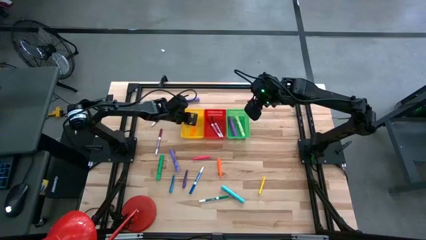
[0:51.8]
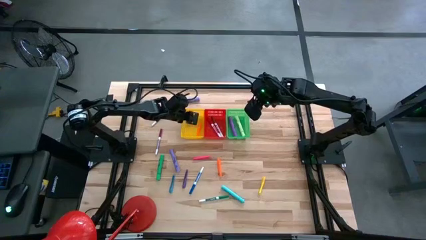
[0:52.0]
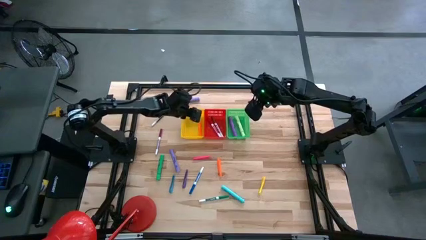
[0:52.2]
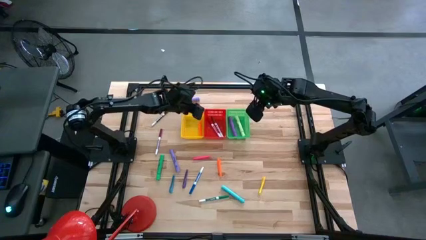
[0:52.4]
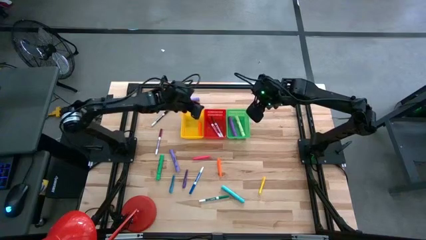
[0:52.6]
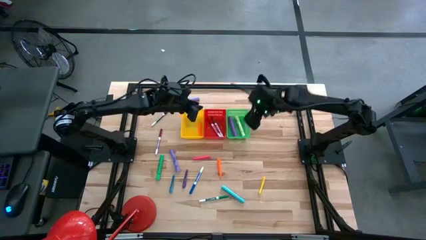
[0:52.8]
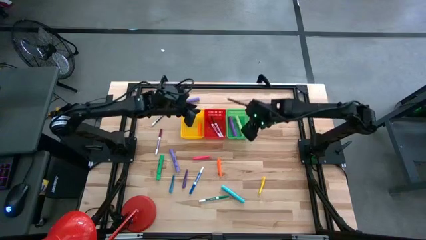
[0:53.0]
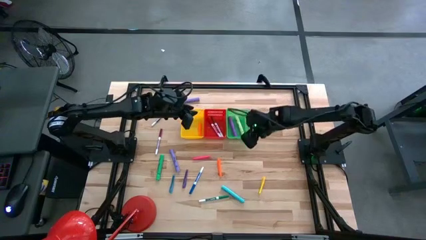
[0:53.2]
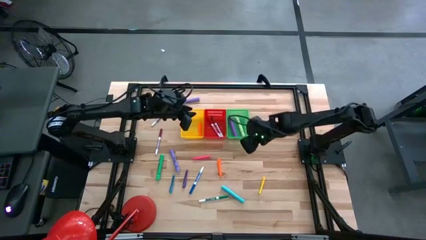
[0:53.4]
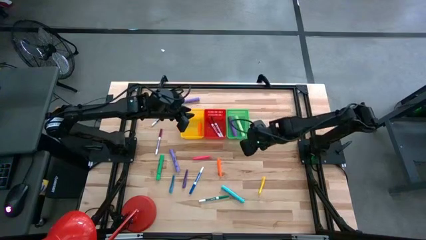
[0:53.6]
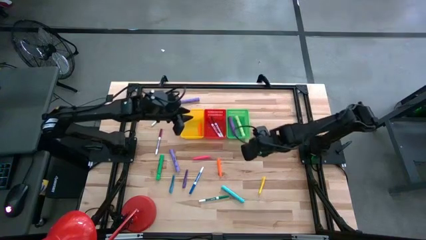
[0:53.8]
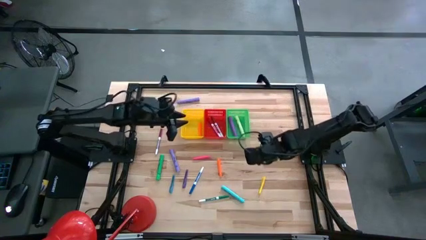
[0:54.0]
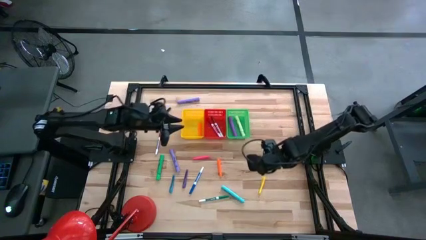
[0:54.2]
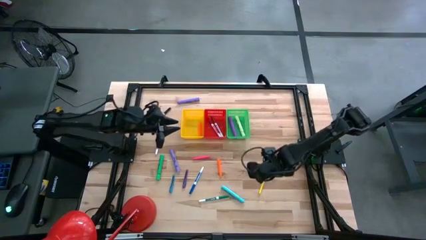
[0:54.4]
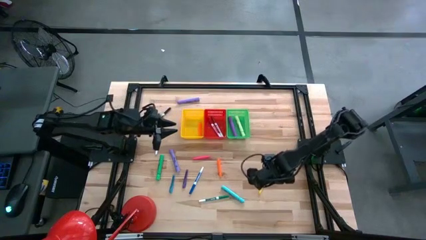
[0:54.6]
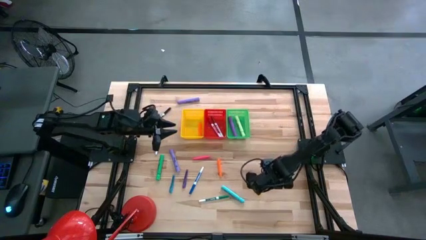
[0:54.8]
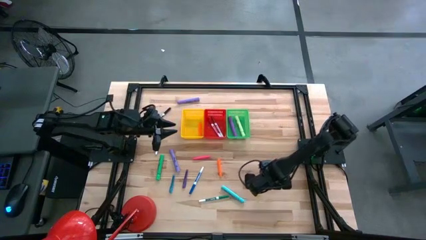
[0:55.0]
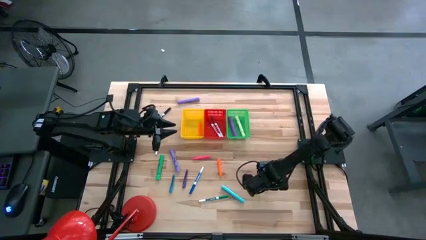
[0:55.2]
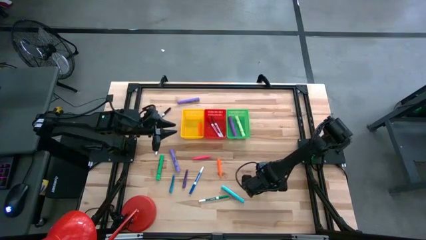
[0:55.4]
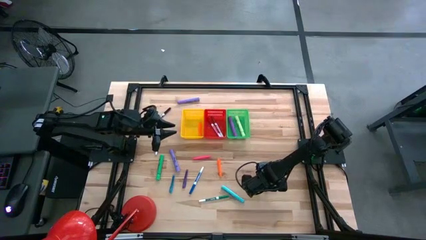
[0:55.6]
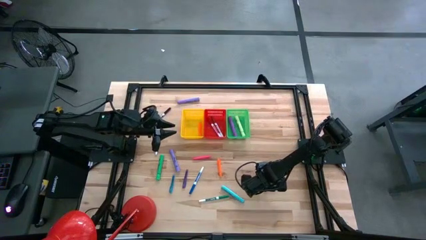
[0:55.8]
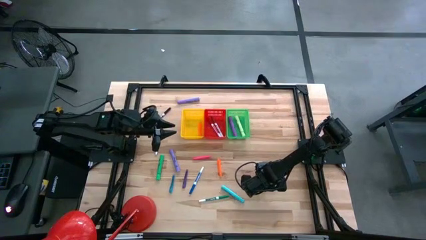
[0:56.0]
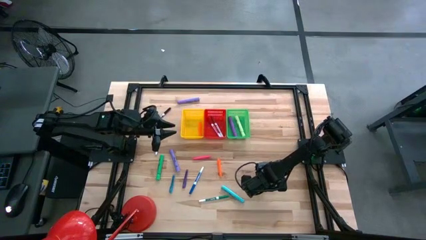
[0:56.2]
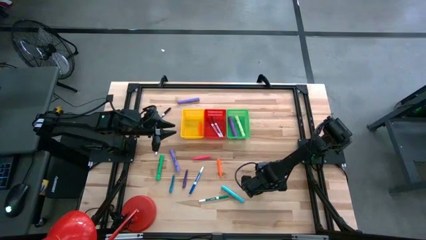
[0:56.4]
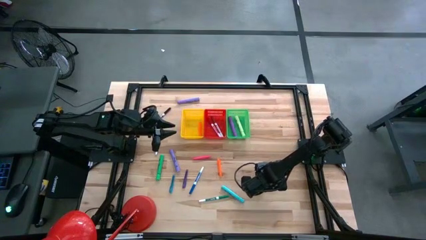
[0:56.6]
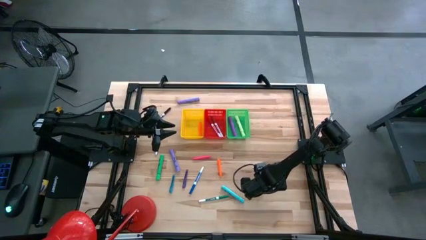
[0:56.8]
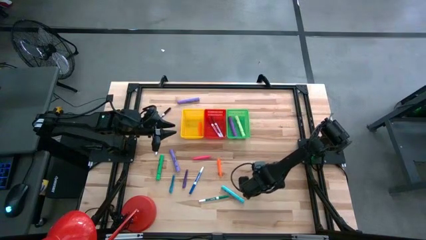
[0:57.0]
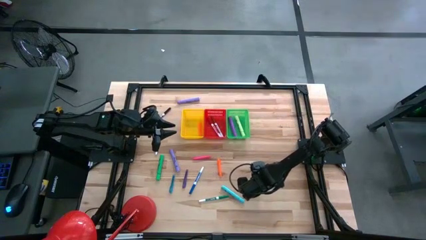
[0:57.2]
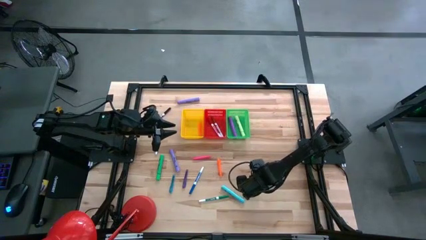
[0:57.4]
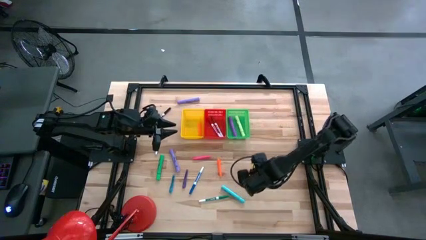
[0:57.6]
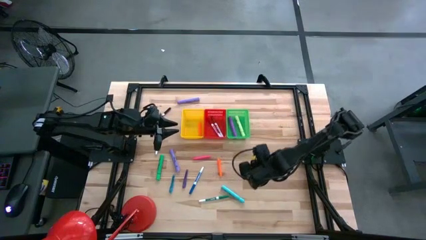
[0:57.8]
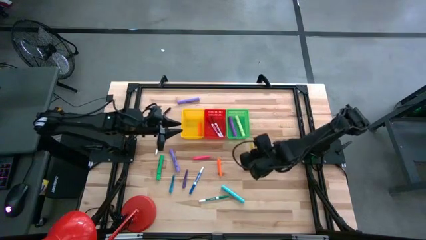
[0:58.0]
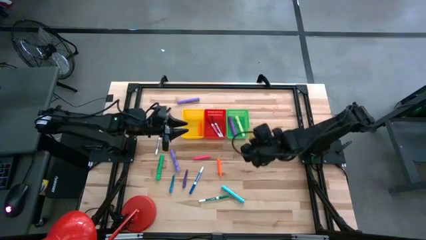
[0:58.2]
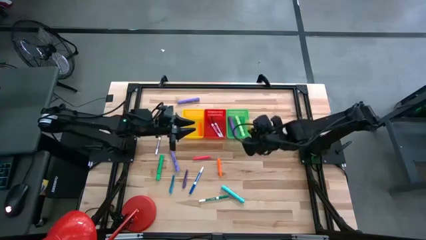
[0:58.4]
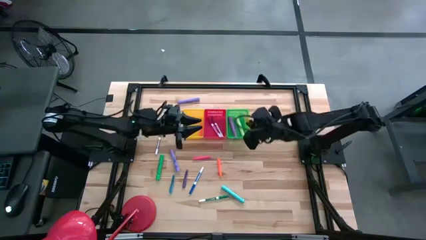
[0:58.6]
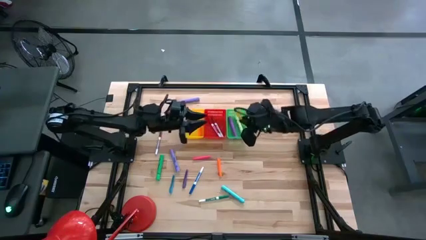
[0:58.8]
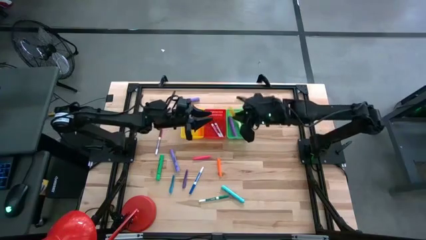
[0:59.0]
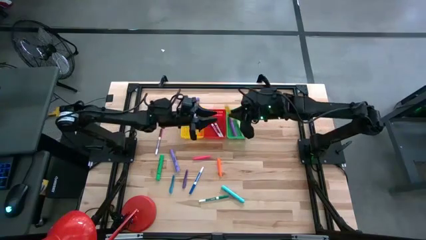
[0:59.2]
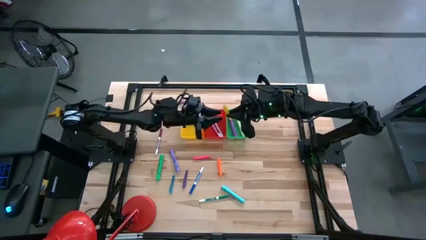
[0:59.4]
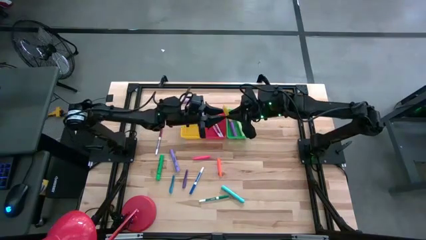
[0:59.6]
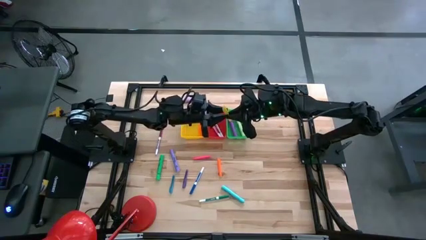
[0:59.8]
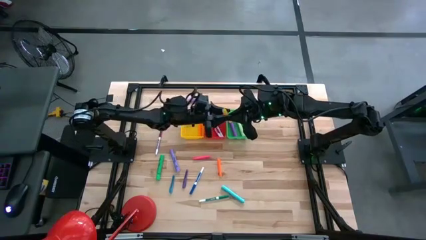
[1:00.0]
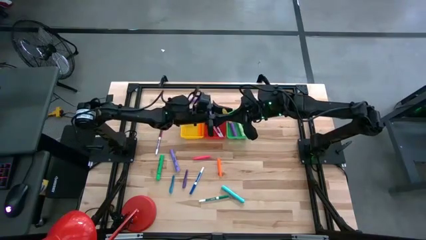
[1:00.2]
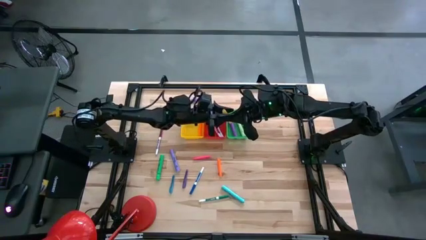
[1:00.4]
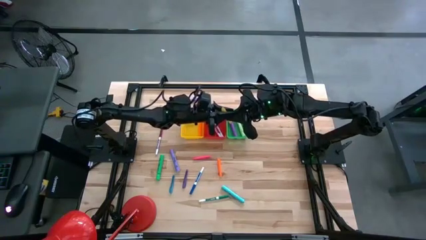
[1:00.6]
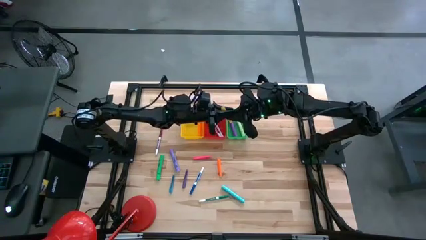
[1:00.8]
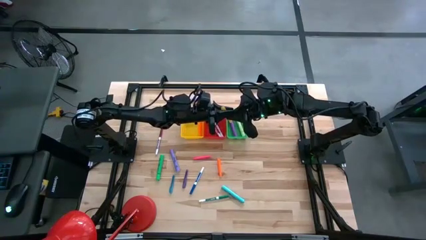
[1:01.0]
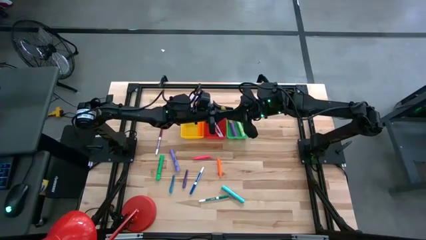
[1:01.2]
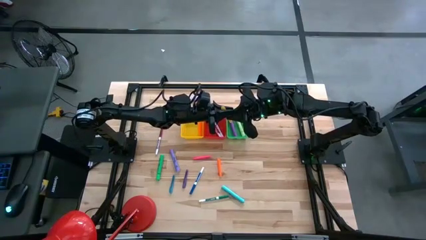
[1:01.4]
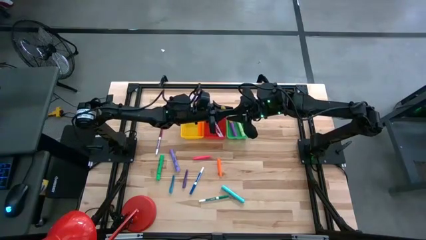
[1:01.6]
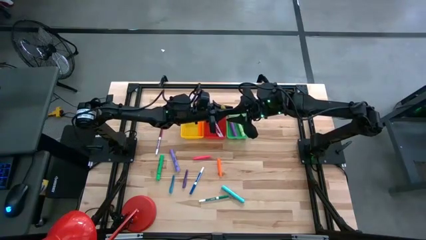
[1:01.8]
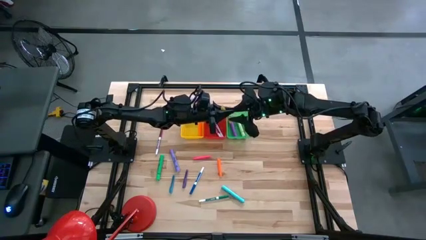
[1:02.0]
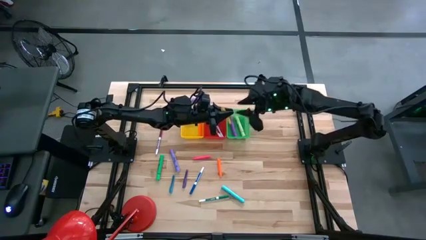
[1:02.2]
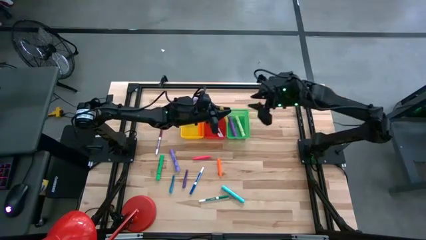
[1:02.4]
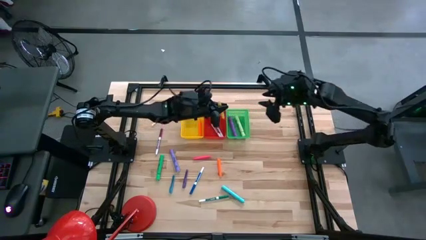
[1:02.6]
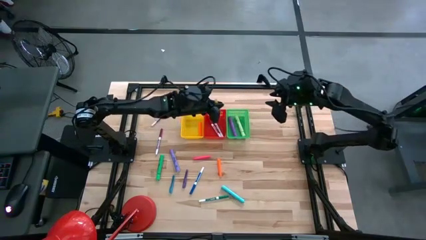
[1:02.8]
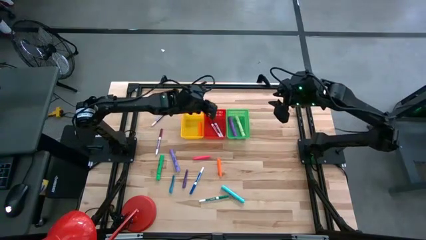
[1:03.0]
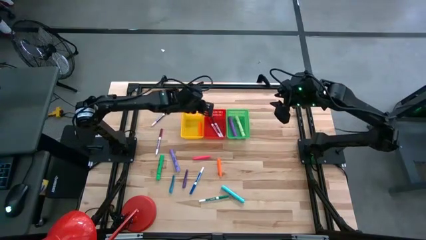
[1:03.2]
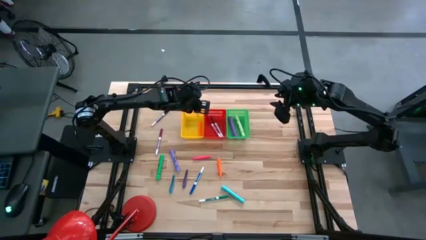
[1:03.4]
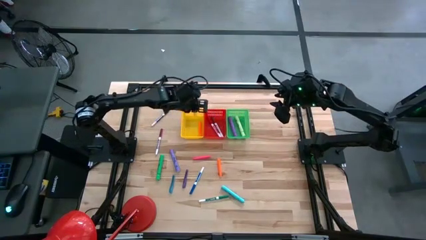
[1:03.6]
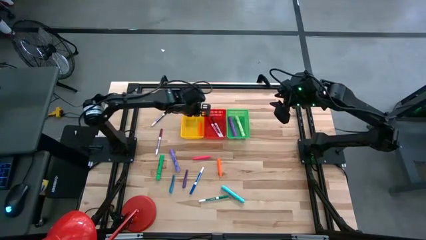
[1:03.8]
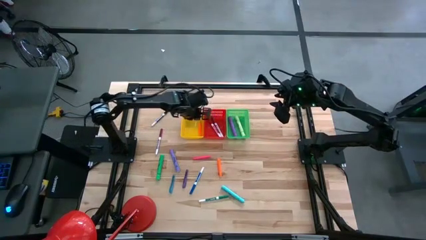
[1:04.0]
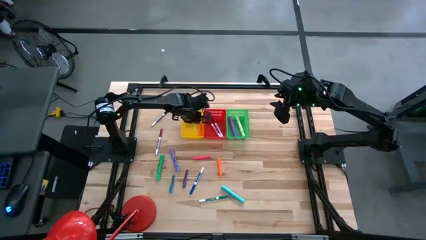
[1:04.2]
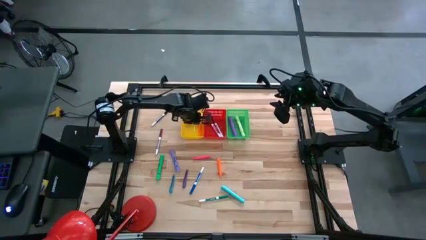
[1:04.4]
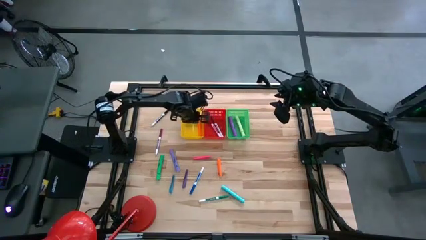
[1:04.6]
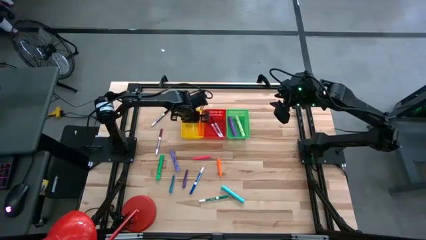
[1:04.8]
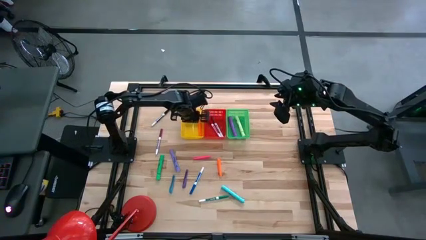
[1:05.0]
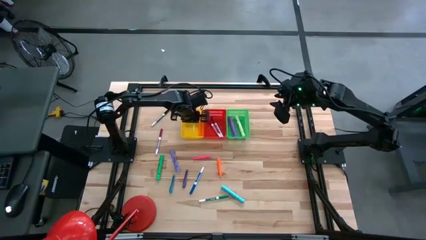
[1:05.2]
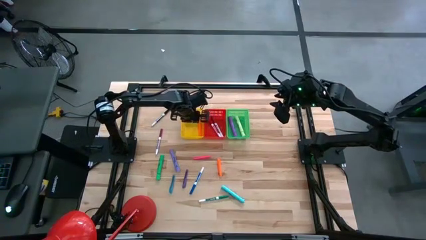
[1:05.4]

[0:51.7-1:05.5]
Task: Pick & Place Markers
Put the yellow pen into the yellow bin
